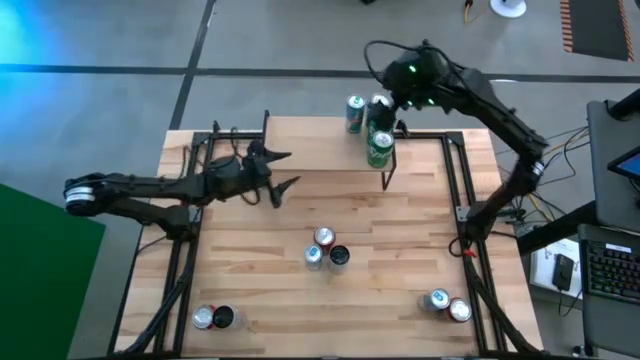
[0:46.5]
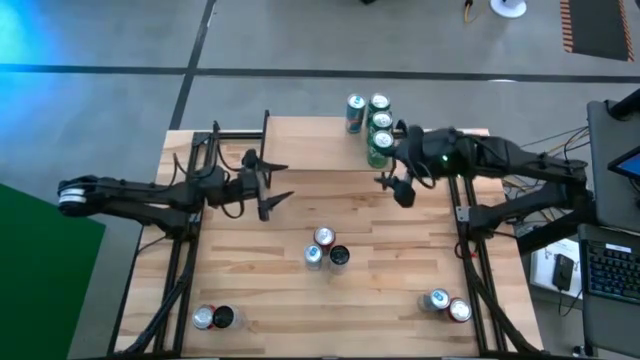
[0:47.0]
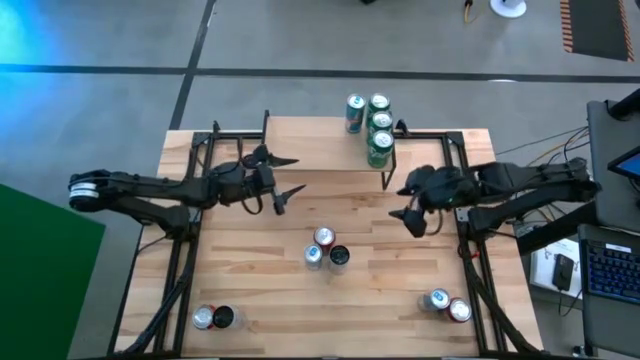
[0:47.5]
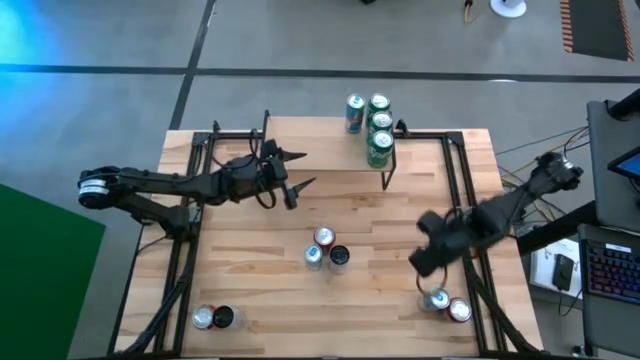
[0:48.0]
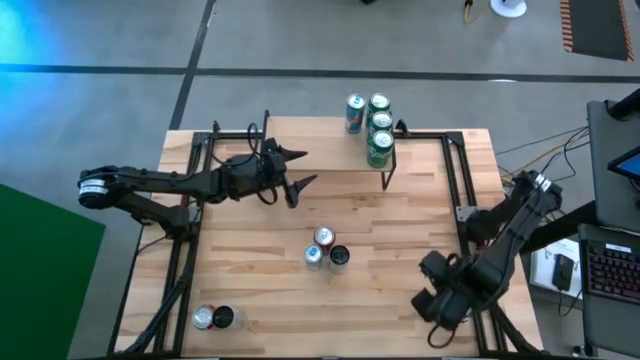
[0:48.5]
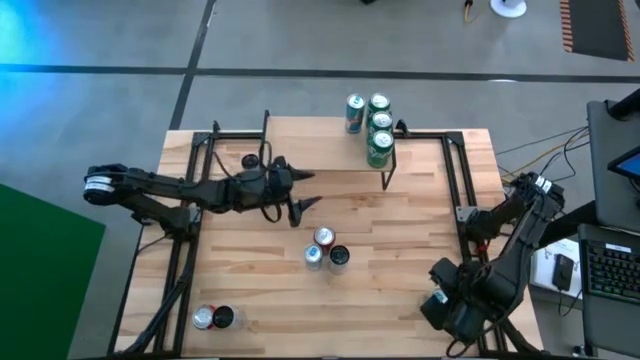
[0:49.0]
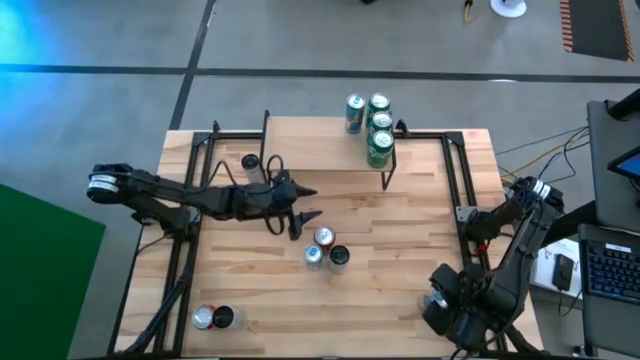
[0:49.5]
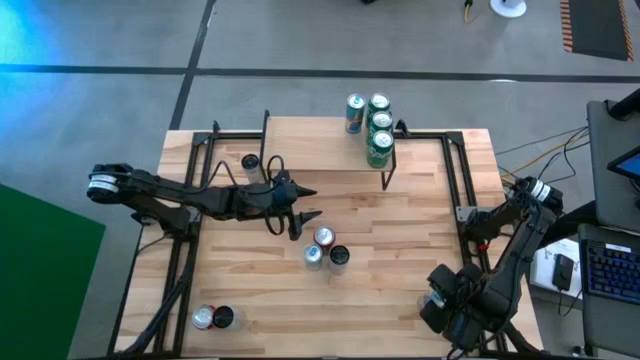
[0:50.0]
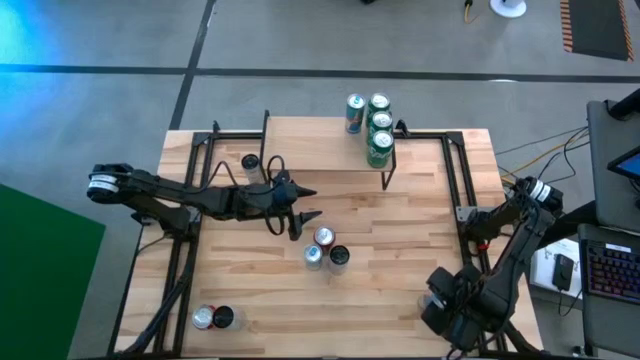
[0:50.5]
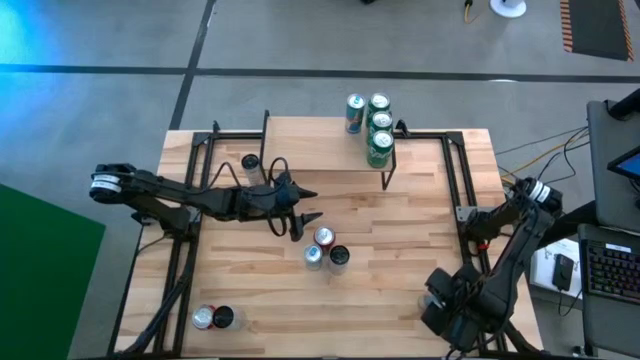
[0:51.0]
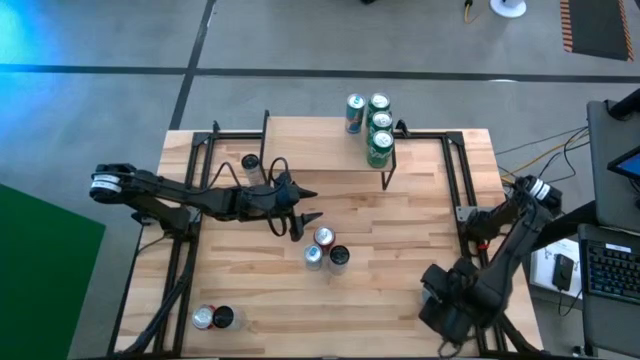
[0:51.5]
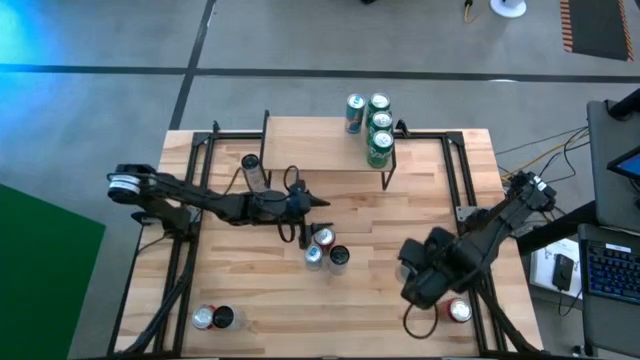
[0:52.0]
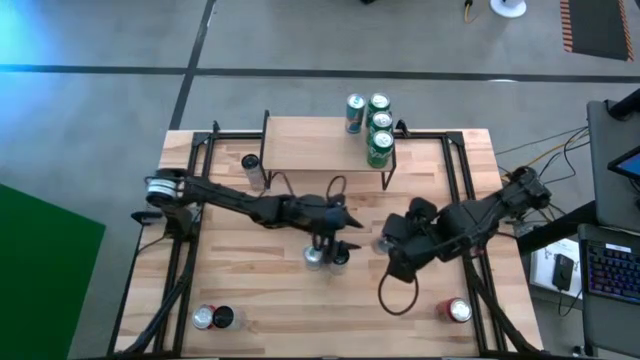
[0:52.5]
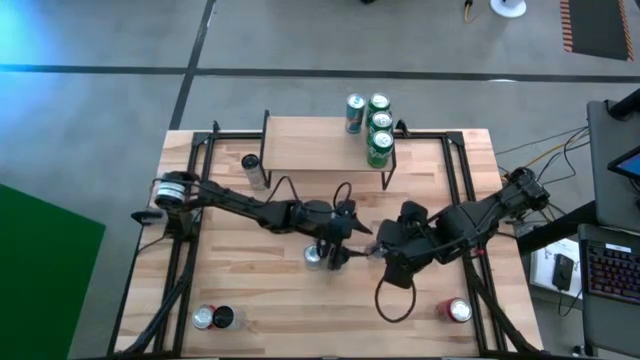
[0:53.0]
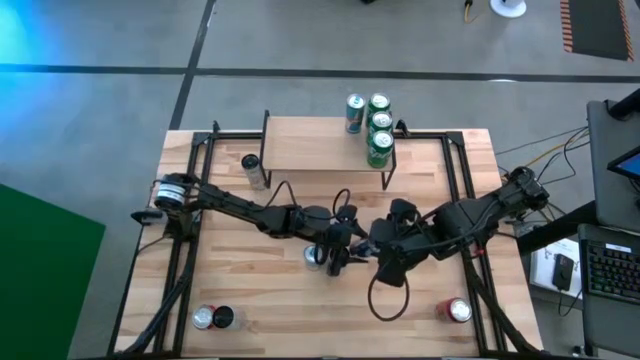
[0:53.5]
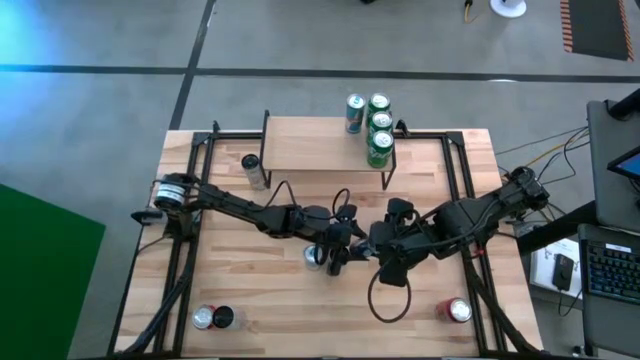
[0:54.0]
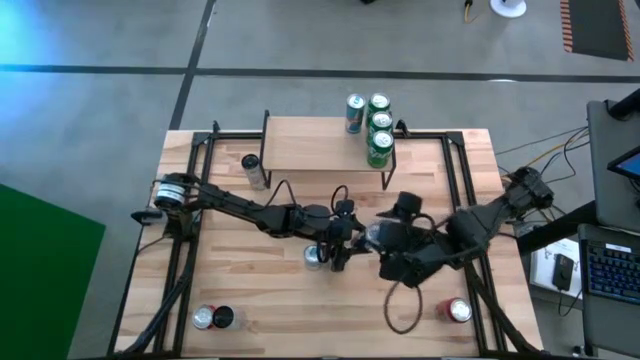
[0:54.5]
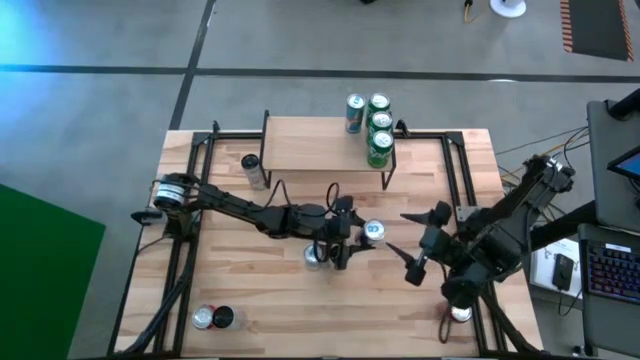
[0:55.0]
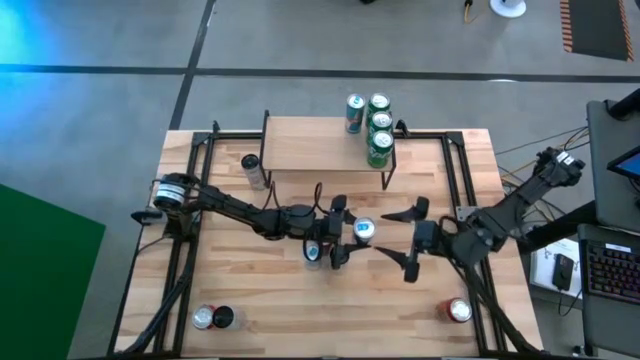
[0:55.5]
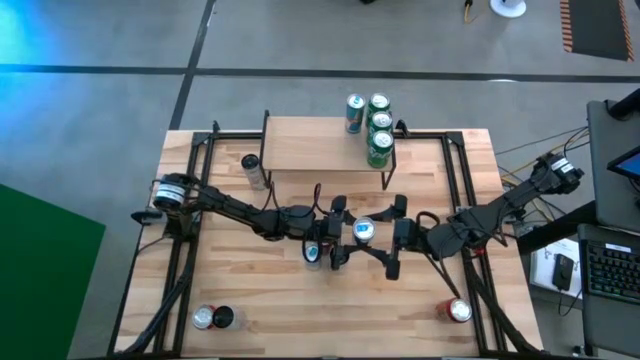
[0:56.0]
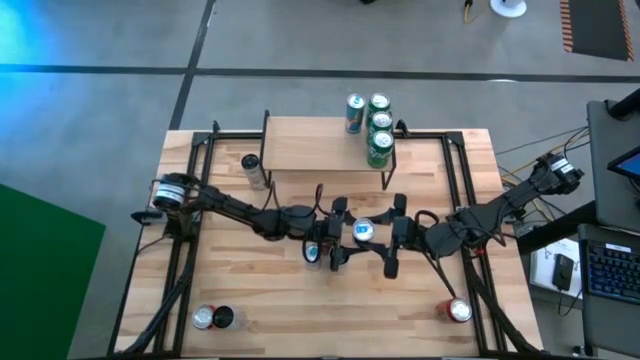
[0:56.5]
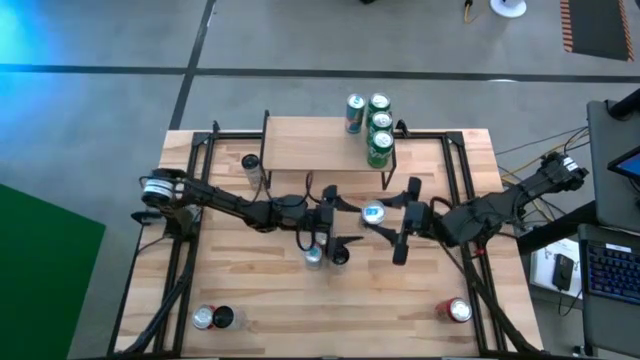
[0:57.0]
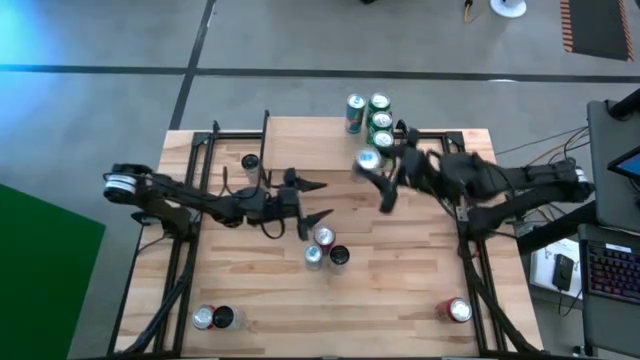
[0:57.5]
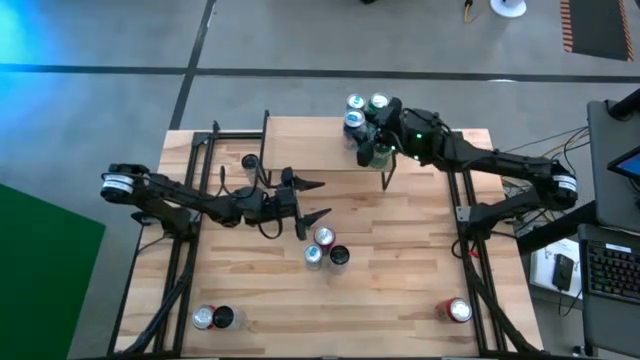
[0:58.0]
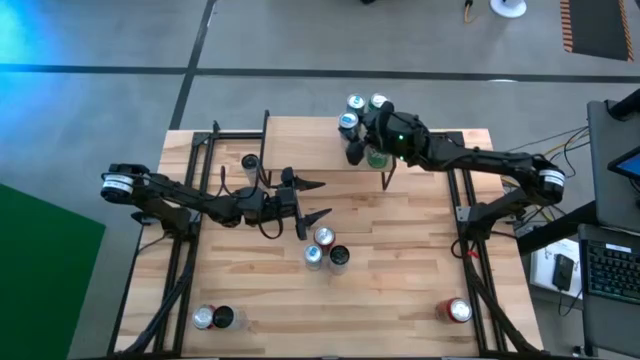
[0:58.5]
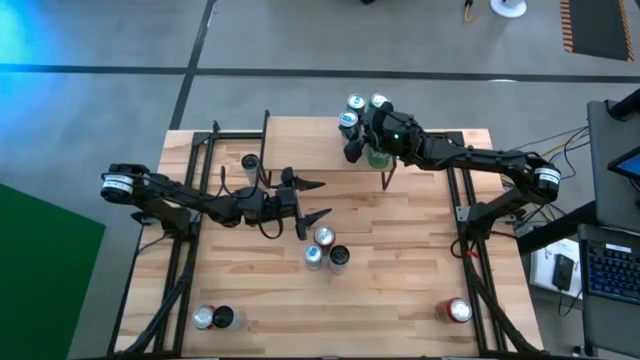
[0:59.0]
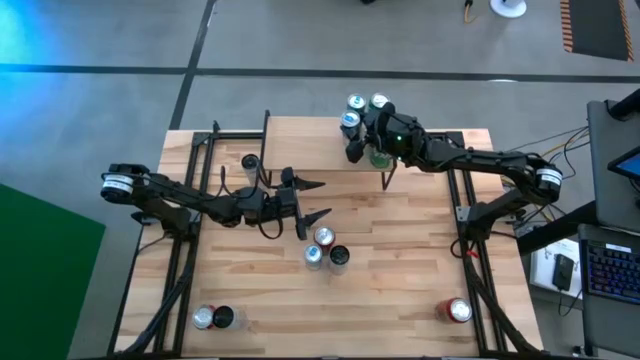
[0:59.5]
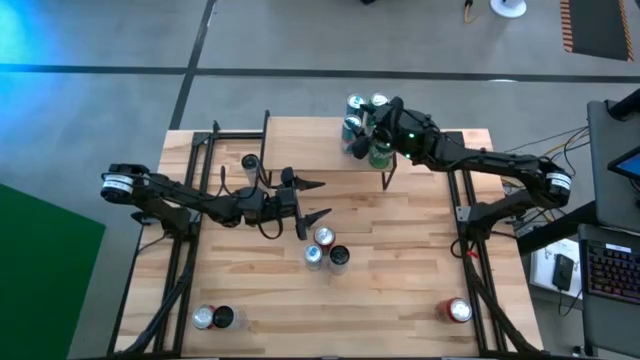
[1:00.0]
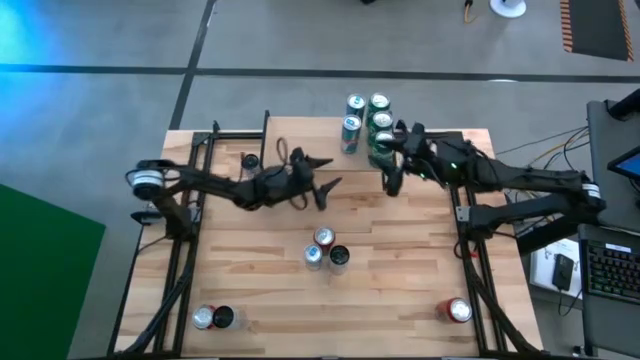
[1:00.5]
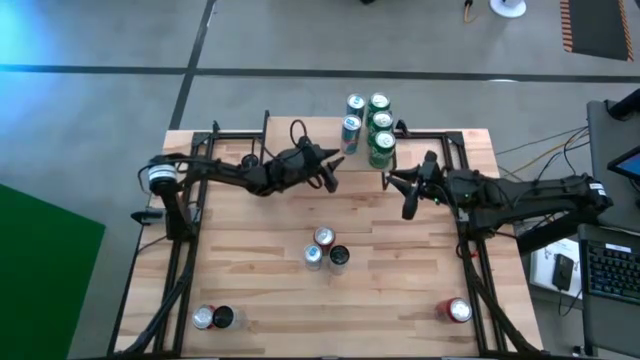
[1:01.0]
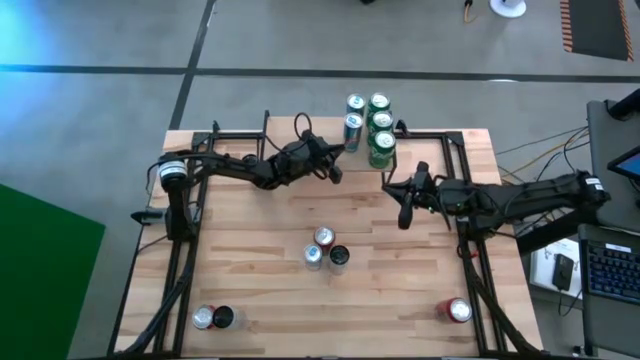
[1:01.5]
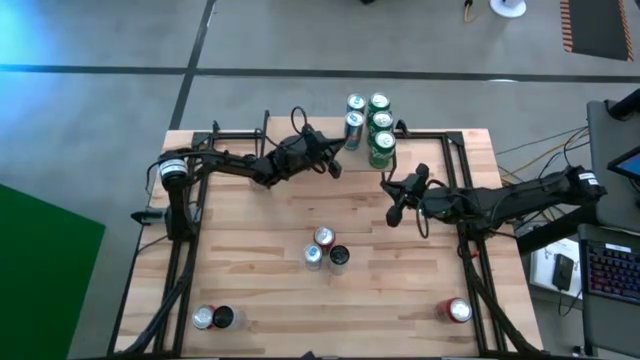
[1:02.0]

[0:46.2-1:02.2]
Task: Place canned beverage on shelf
Put the bottom blue soda can on the shelf aligned with the other blue soda can

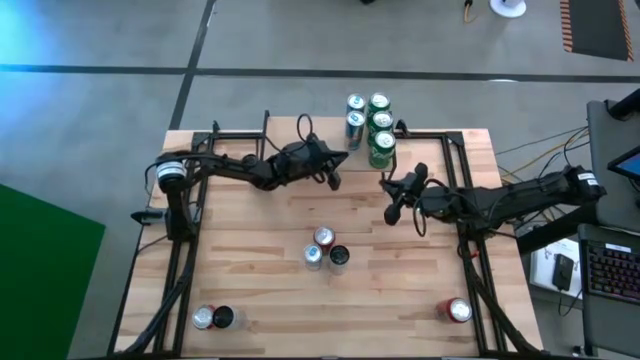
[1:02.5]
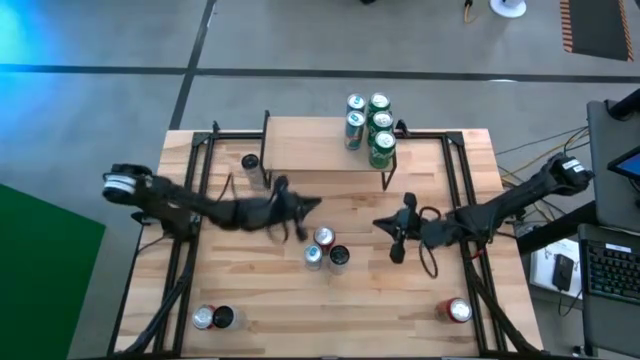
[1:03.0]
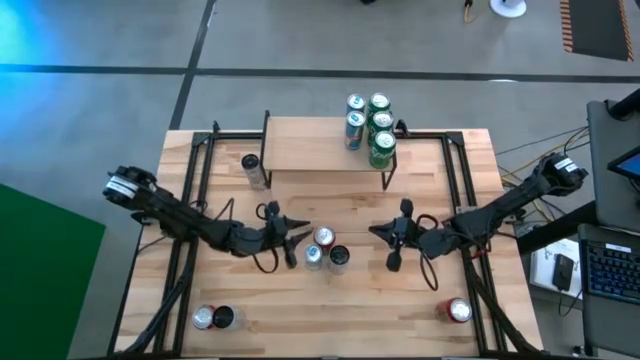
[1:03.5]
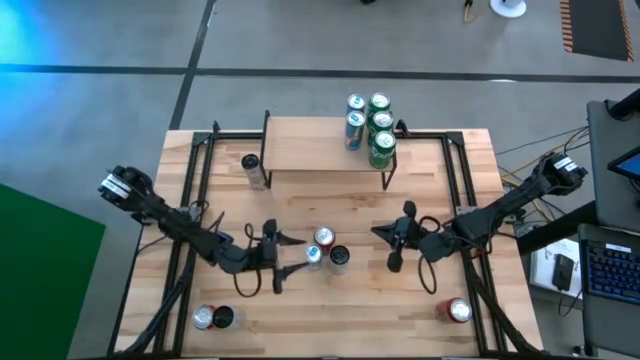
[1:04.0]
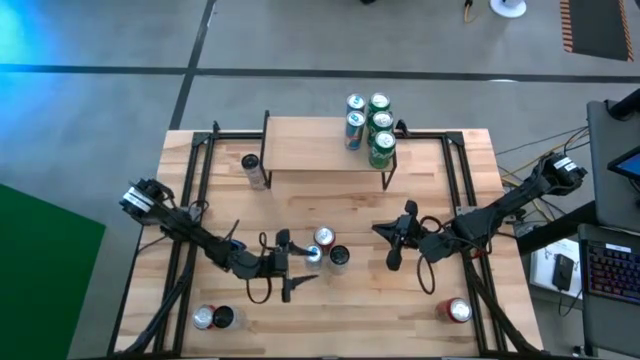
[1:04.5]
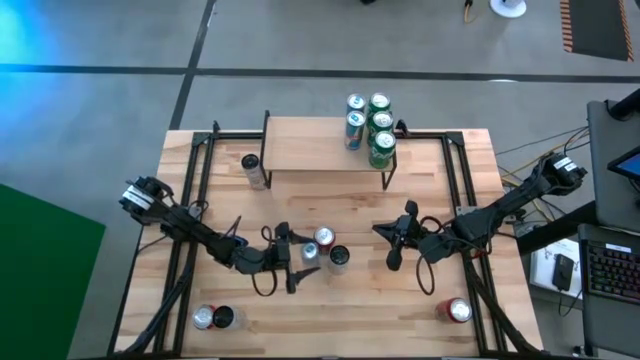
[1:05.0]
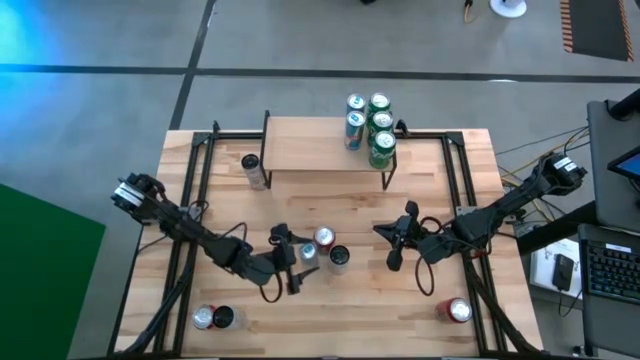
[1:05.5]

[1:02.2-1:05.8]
Put the blue soda can on the shelf aligned with the other blue soda cans

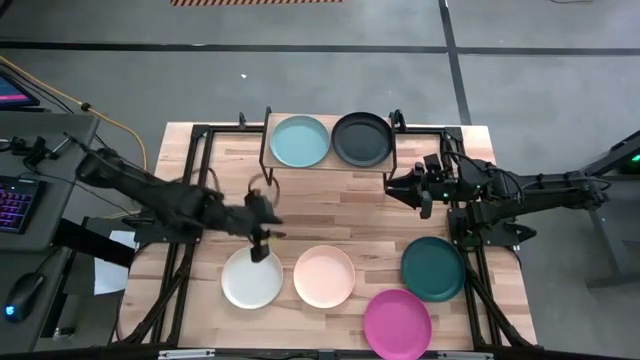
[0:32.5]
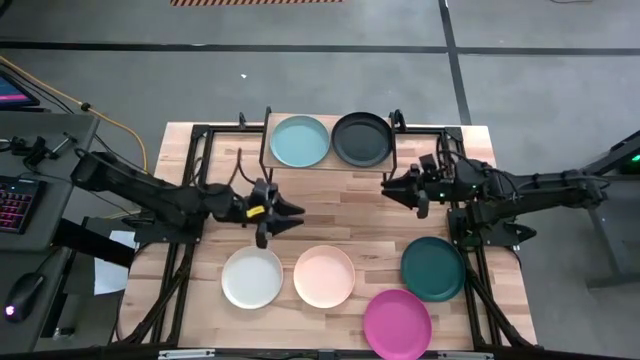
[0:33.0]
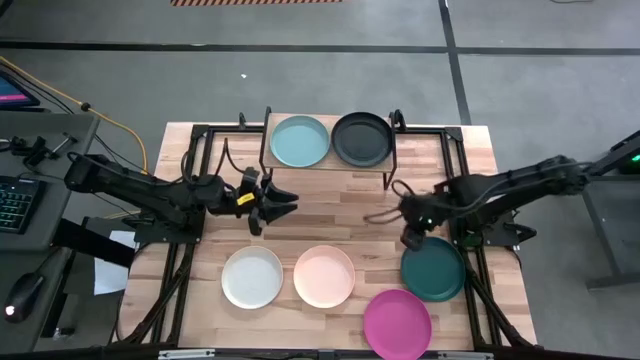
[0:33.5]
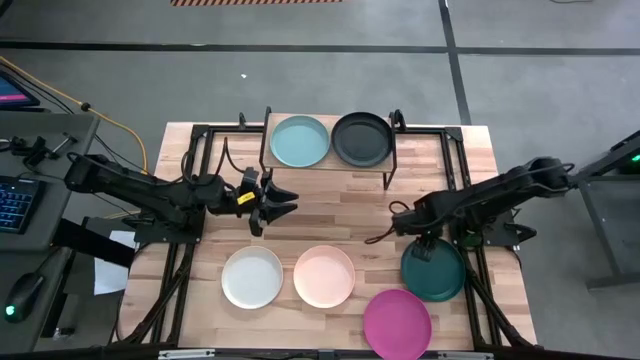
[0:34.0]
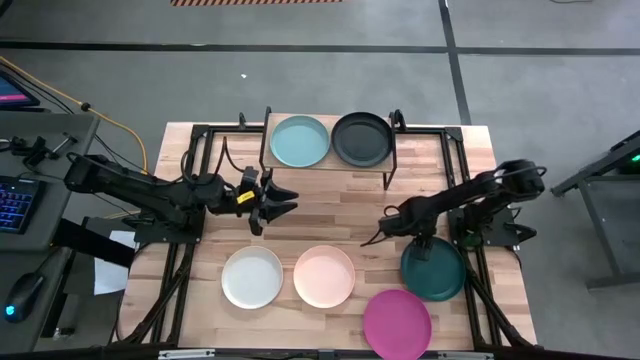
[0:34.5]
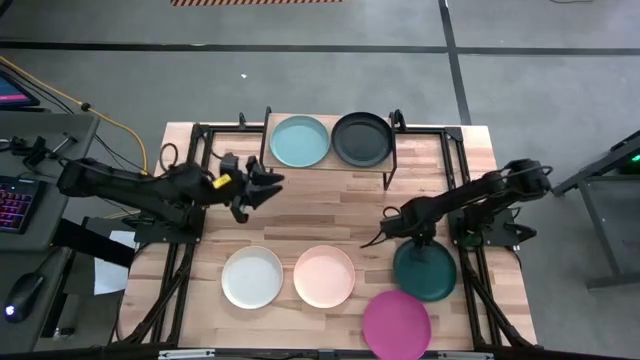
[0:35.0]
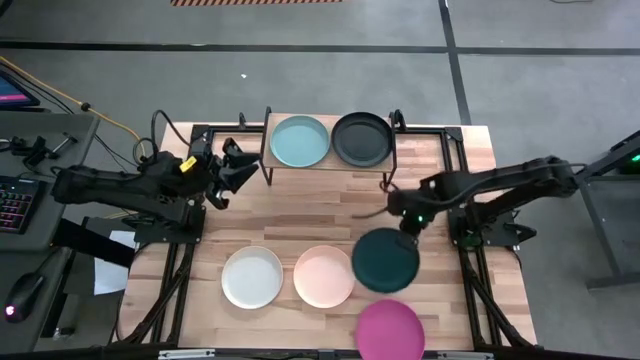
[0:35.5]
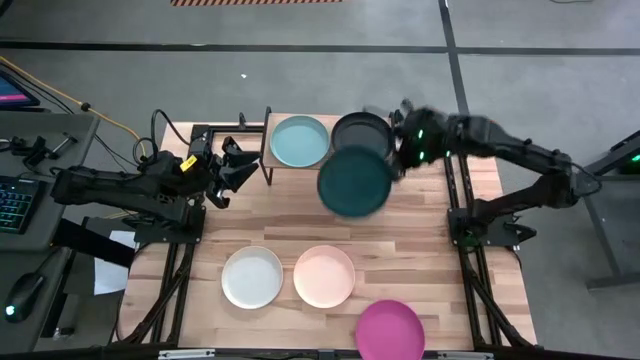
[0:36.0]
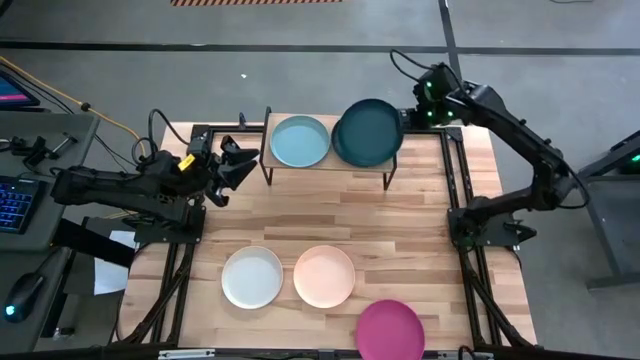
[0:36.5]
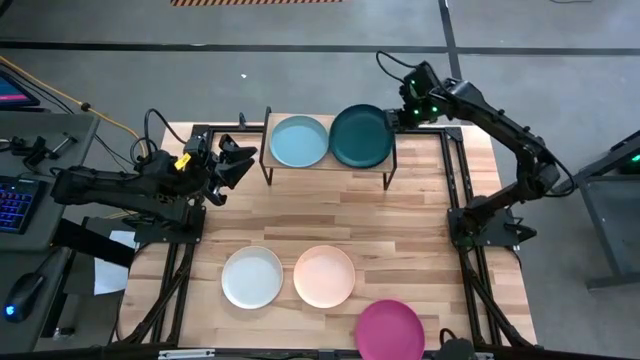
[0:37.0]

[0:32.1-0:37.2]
Task: Place and stack plates onto a shelf
Stack the dark green plate on top of the black plate on the shelf
